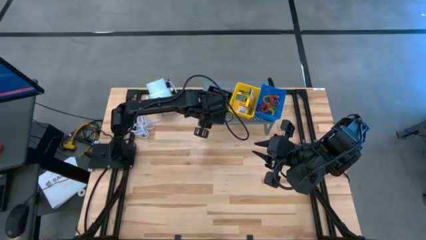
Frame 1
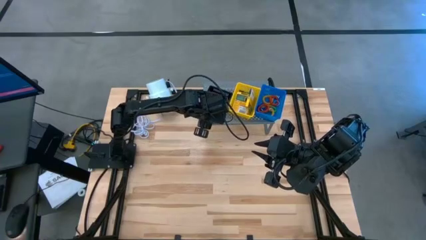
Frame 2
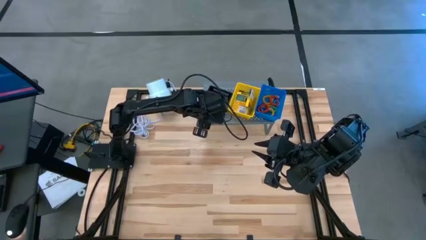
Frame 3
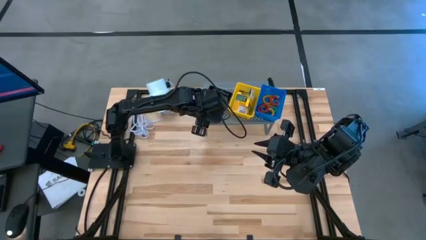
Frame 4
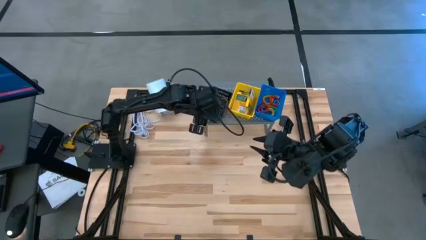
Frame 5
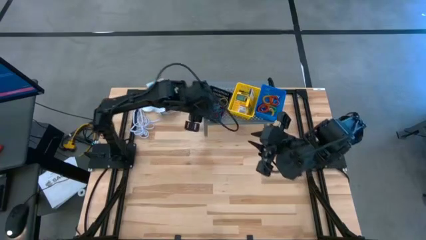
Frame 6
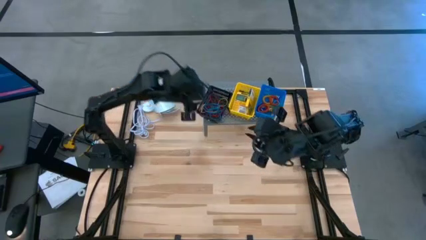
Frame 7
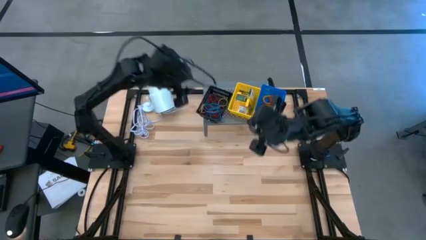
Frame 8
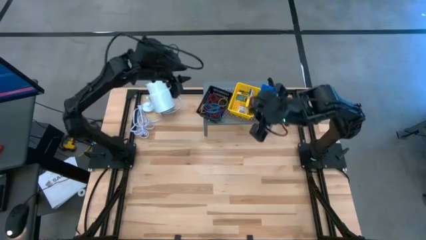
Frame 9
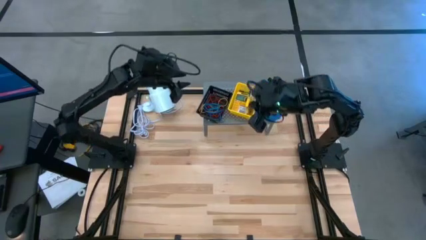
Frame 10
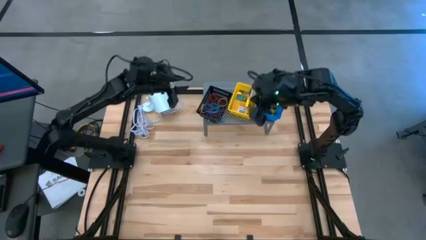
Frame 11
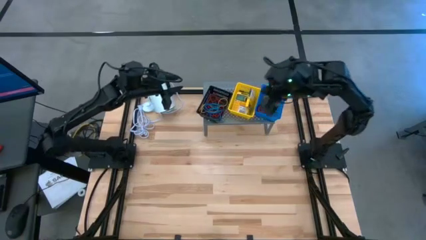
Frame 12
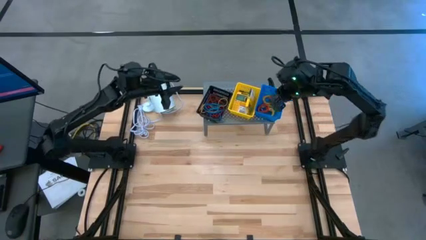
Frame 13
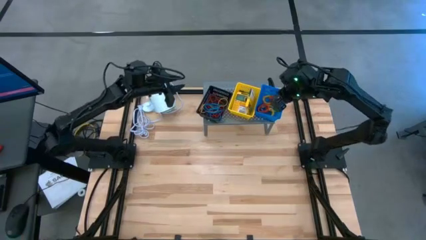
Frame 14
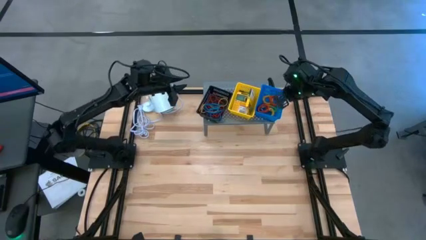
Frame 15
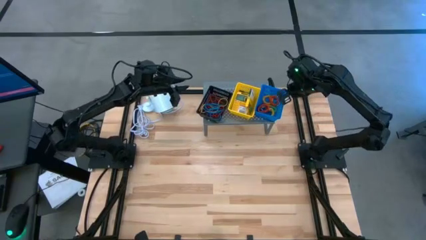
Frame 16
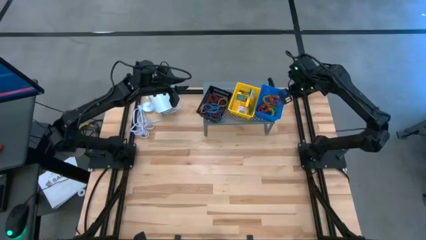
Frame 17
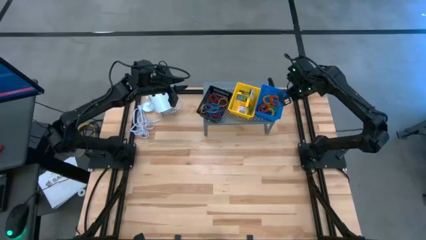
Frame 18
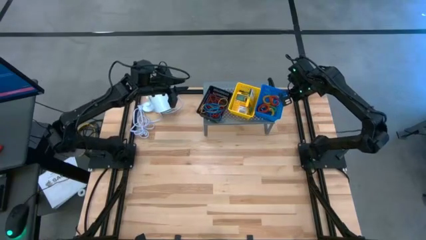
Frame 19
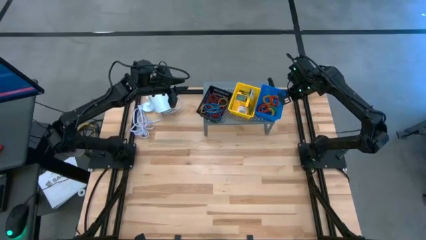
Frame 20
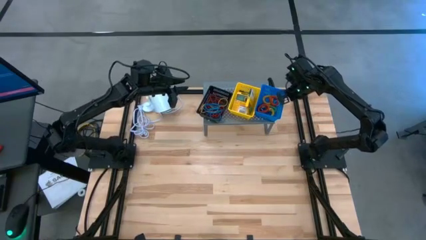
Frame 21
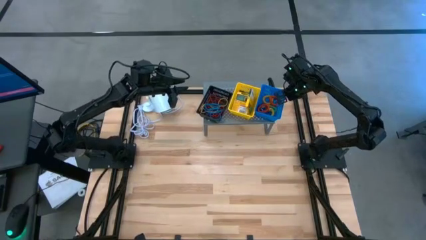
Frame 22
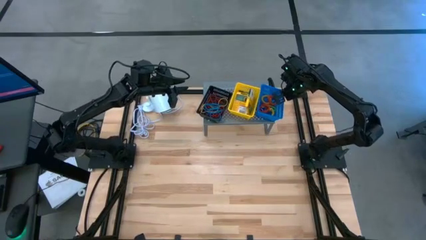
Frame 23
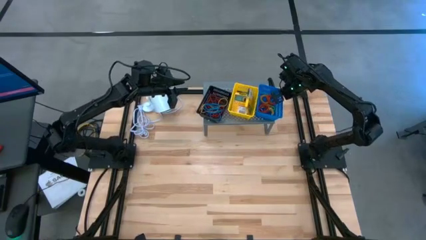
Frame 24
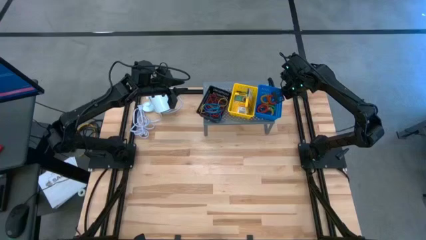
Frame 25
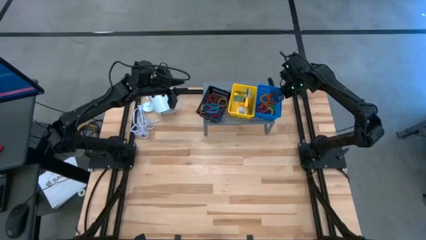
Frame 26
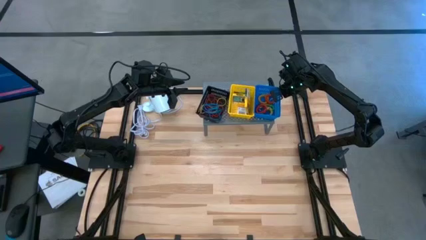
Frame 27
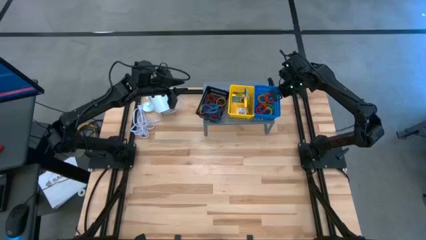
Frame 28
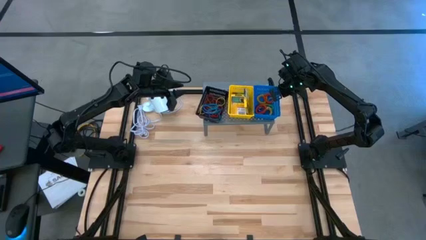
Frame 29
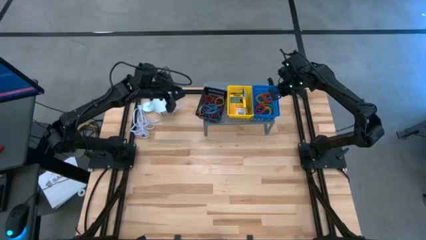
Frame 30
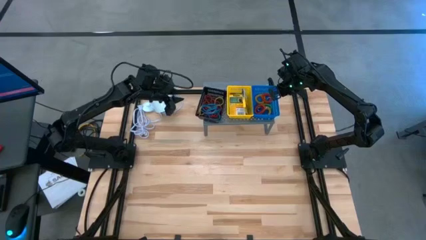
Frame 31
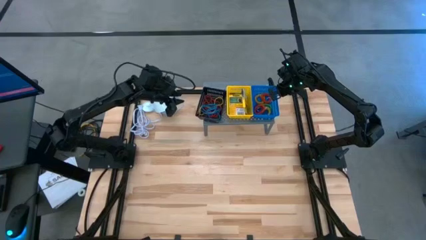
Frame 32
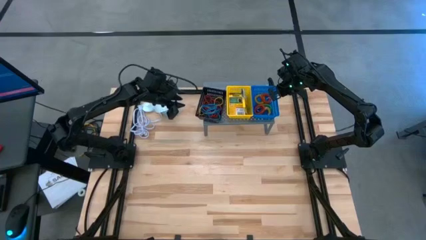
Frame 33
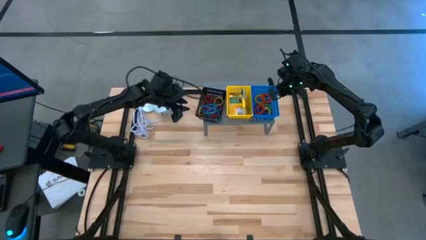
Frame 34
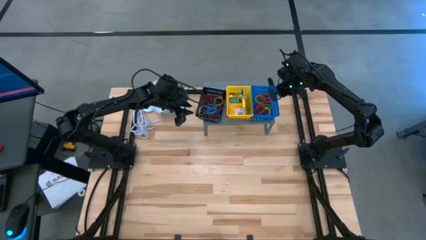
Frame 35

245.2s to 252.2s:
Task: Pick & Place Office Desk Supplies
Adjust the blue bin

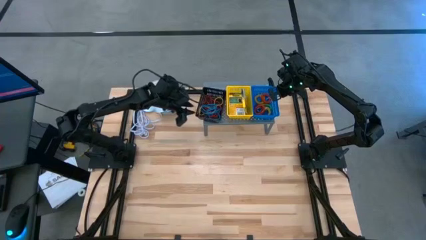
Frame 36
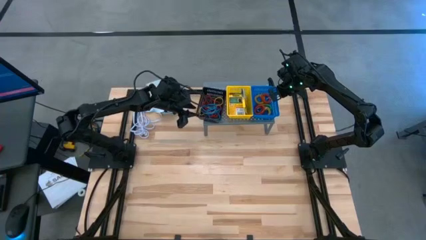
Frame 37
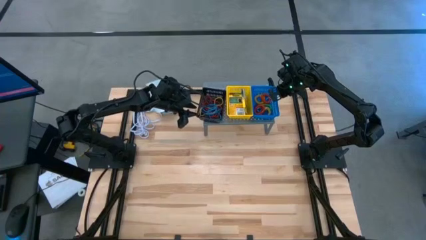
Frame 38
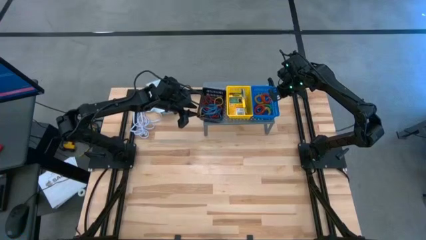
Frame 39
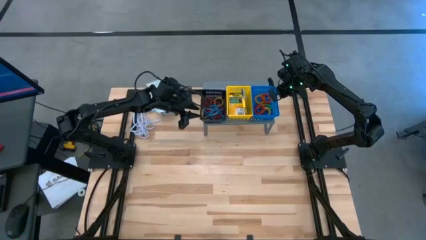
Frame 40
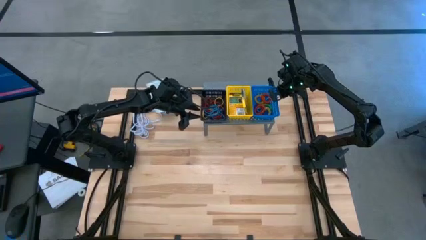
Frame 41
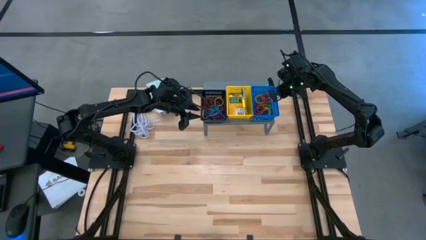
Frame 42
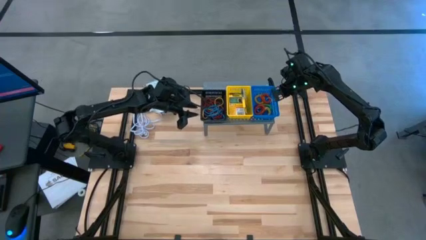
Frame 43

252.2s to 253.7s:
Adjust the black bin

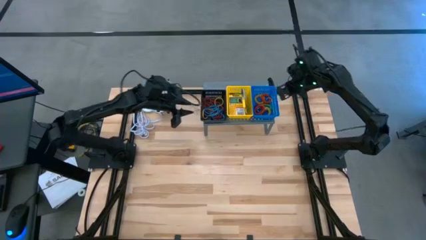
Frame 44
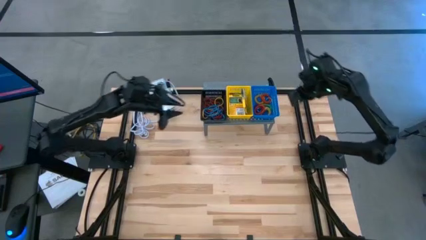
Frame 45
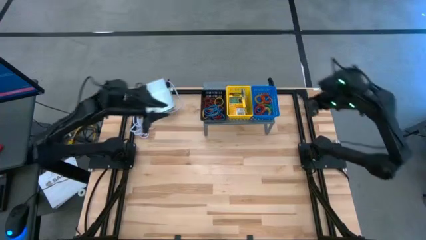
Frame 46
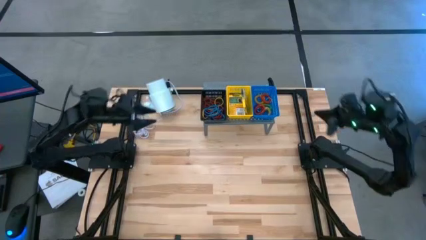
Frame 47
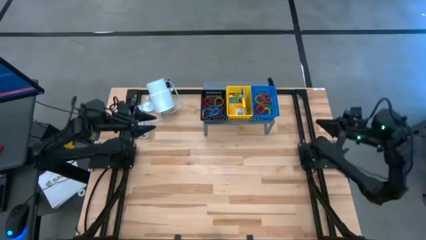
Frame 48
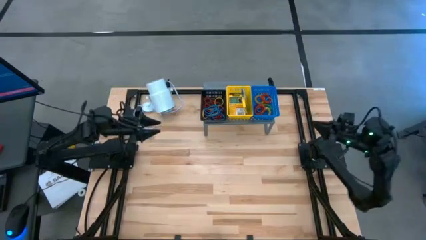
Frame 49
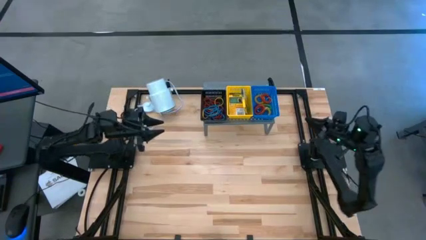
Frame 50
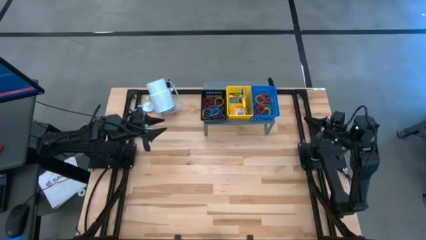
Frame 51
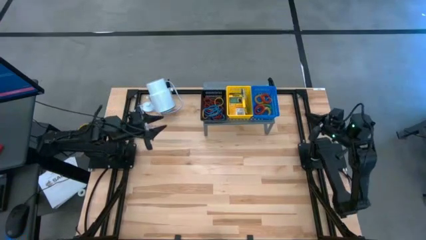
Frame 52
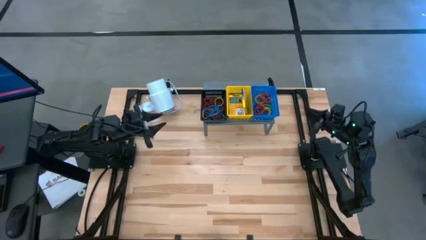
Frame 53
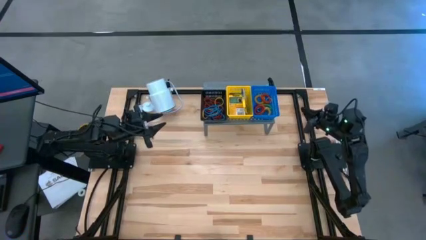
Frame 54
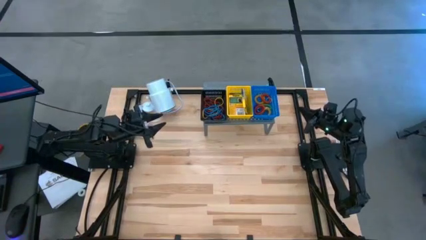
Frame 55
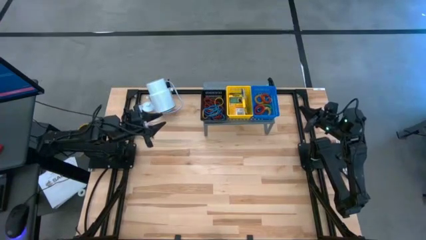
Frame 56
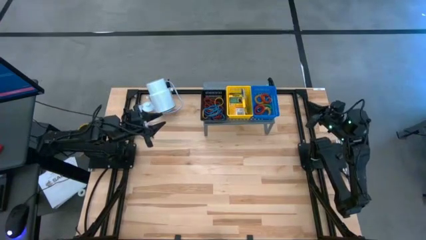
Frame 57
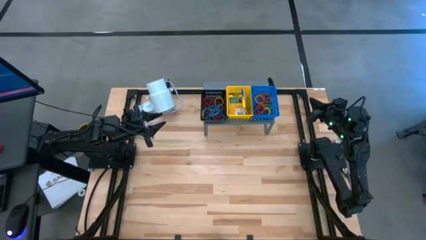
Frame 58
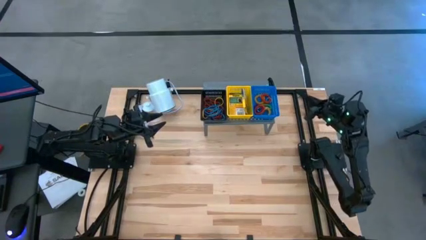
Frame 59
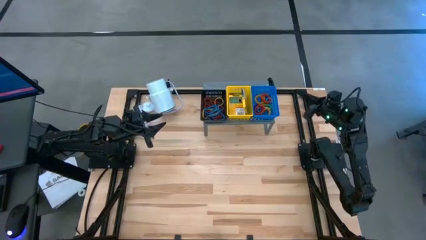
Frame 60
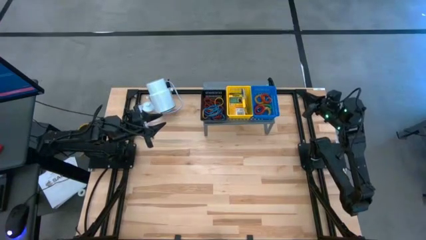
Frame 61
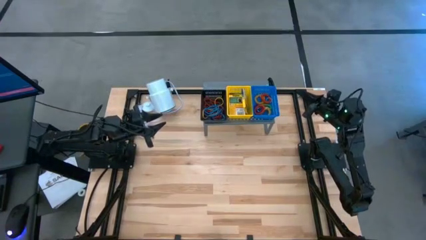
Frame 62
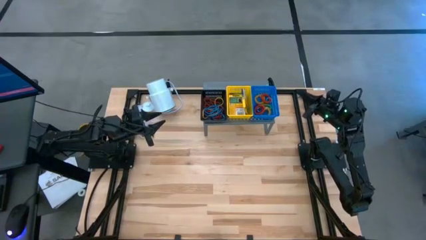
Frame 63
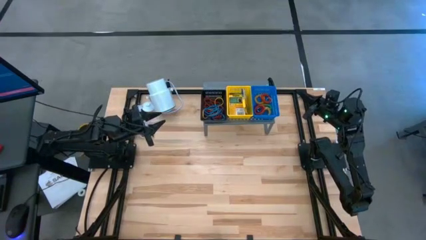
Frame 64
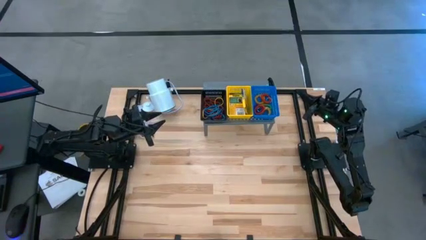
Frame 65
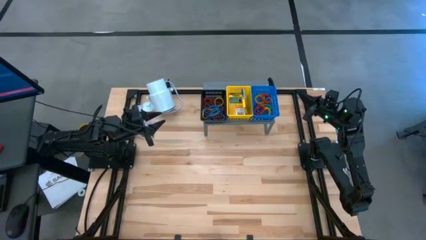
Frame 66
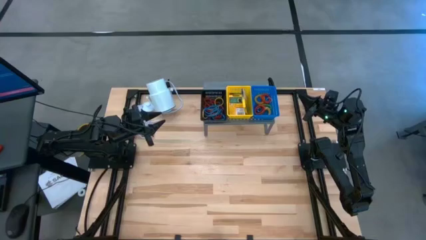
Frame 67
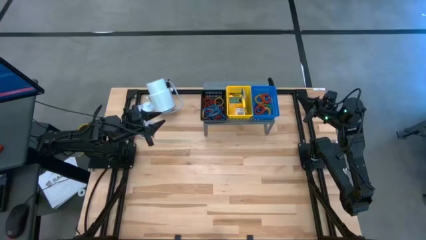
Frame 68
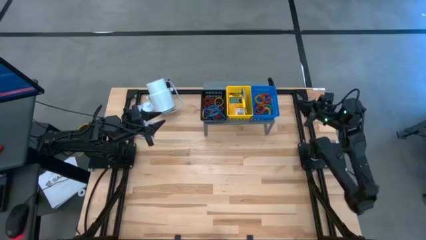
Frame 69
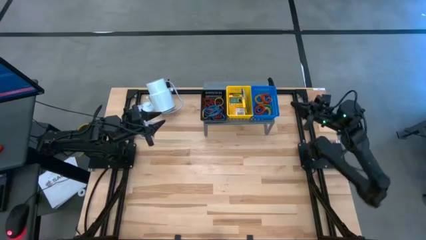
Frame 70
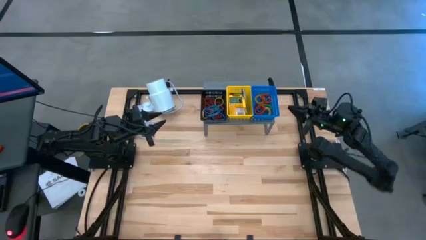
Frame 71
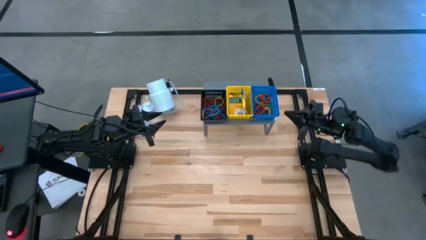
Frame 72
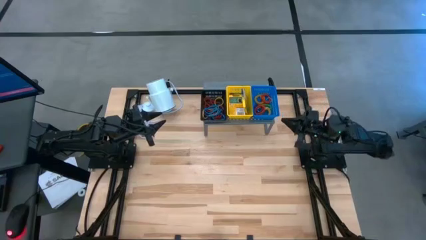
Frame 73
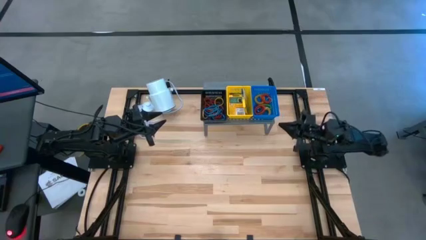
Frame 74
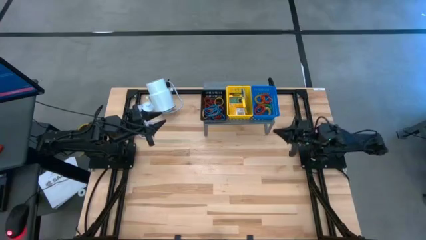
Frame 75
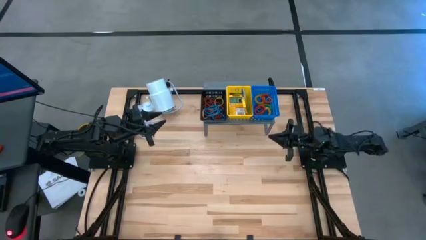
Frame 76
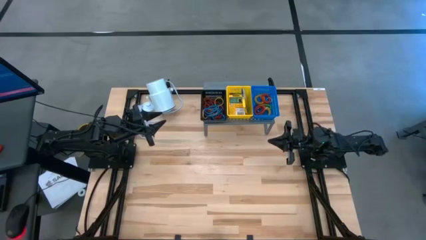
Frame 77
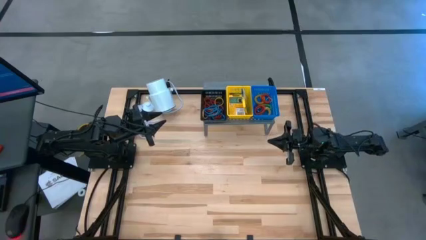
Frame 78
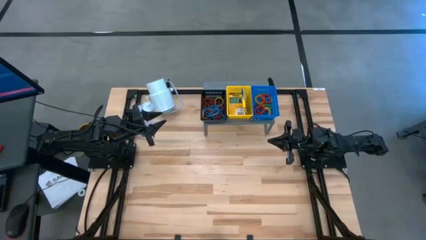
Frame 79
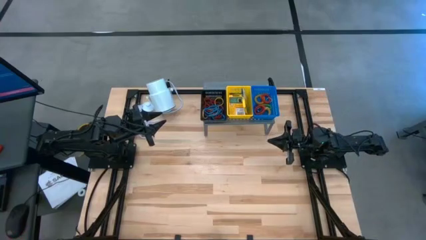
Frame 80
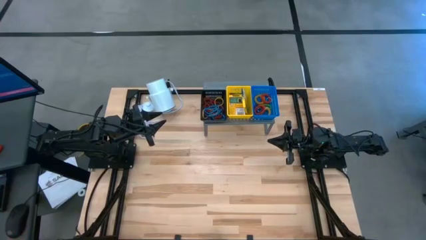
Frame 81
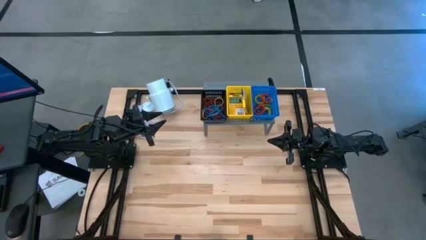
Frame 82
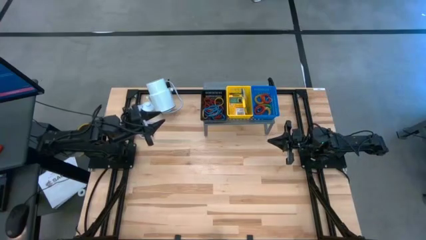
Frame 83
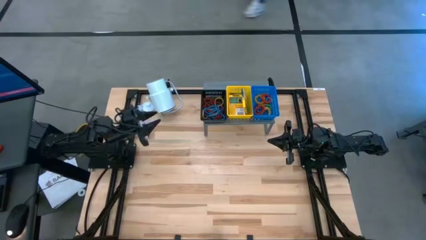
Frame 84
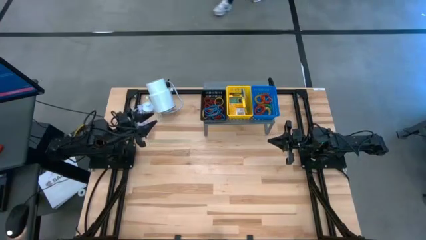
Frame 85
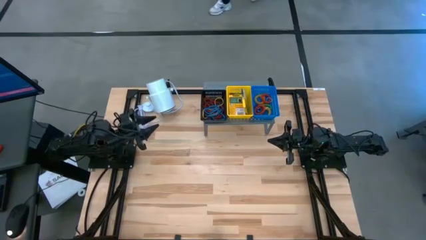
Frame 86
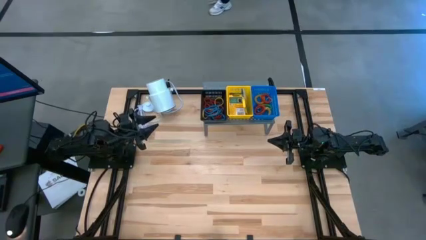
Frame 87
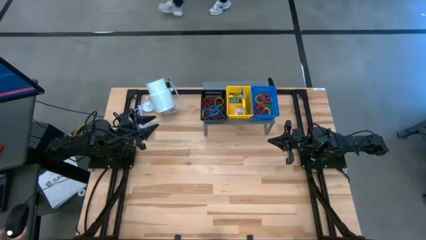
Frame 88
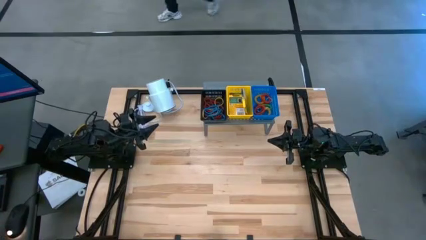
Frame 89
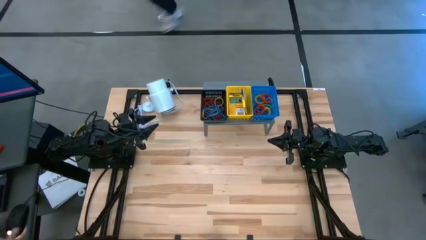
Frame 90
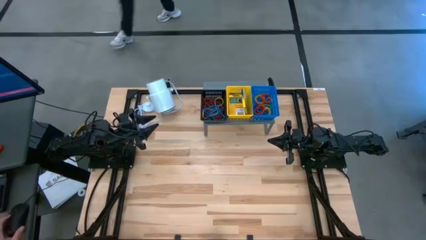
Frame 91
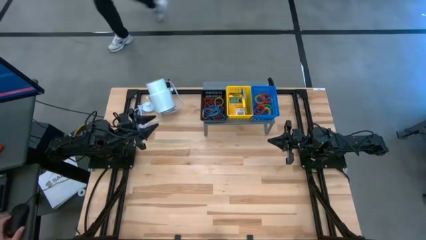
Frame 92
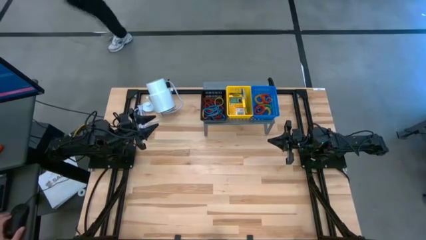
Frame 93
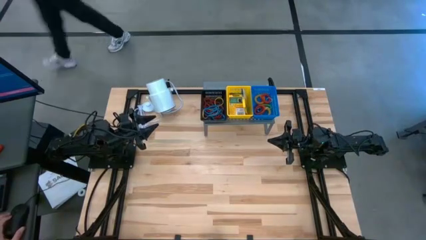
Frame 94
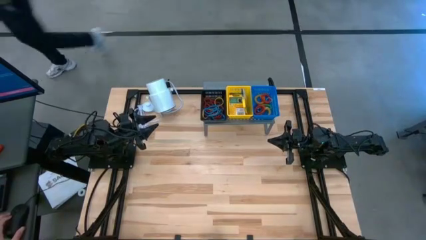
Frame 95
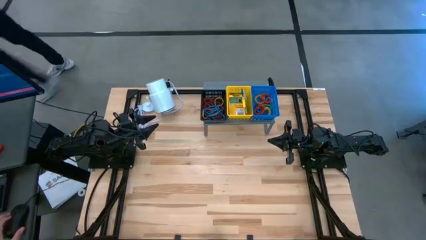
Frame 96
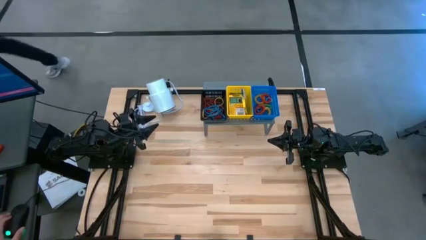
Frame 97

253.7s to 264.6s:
Return to Home Position
